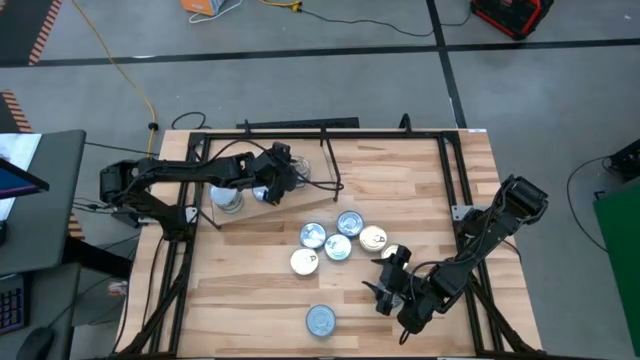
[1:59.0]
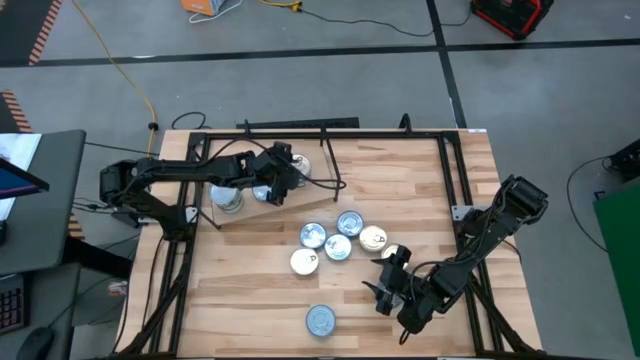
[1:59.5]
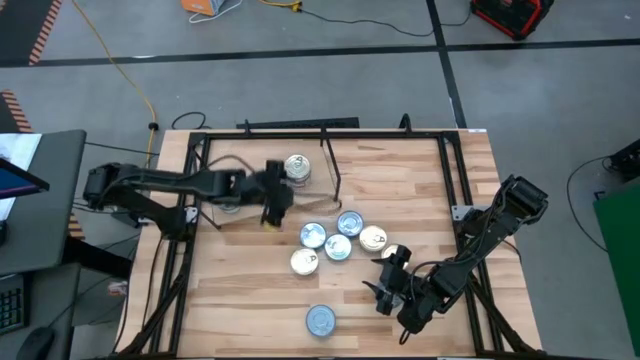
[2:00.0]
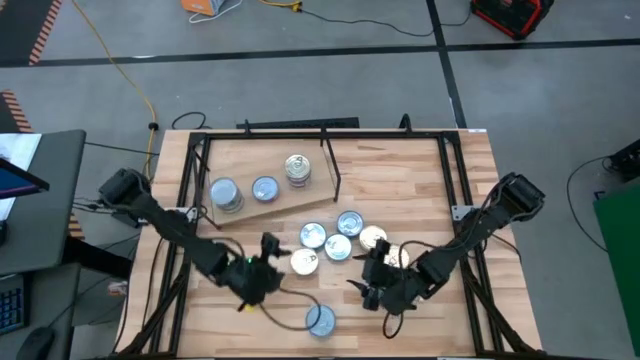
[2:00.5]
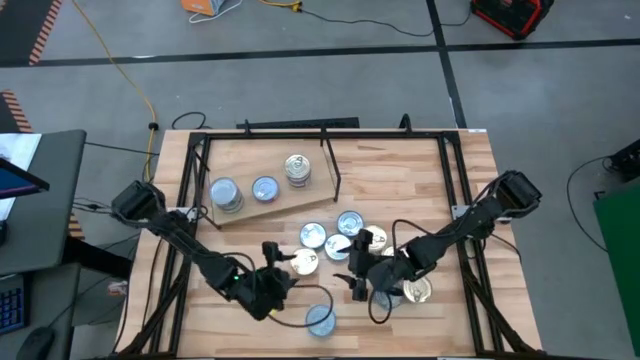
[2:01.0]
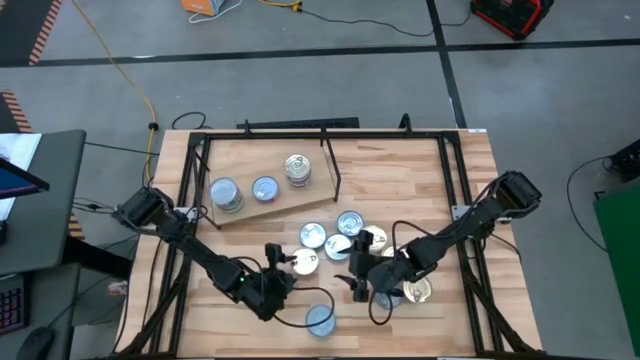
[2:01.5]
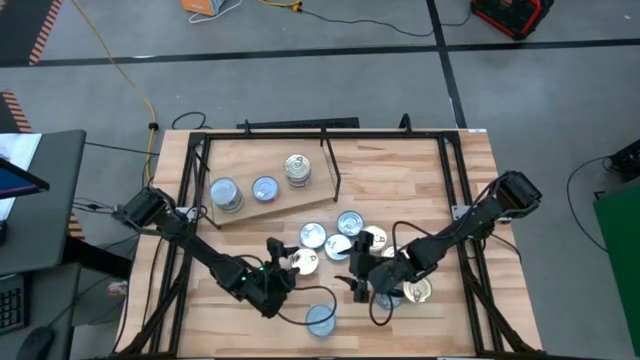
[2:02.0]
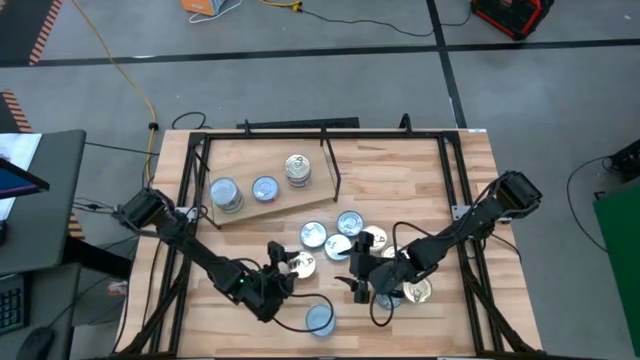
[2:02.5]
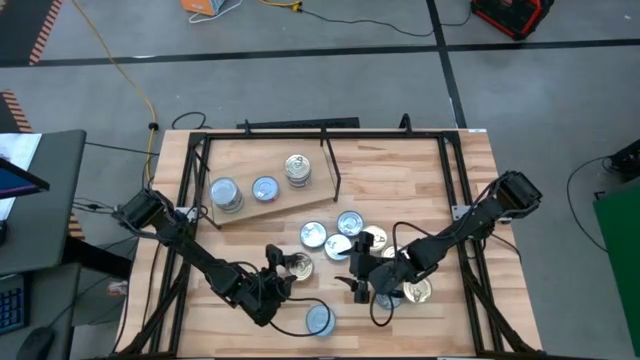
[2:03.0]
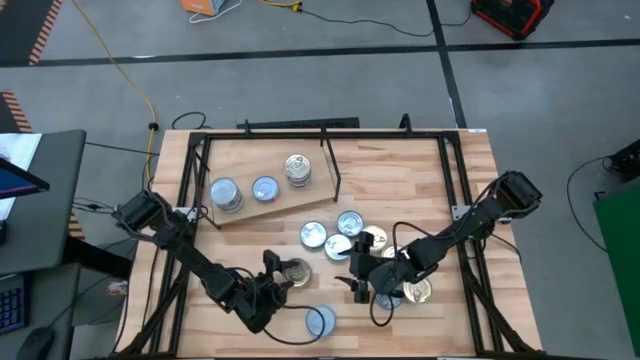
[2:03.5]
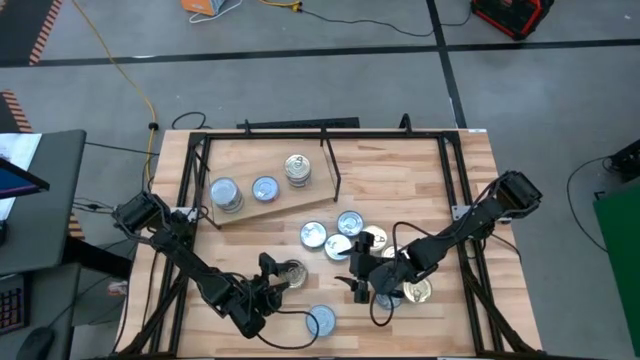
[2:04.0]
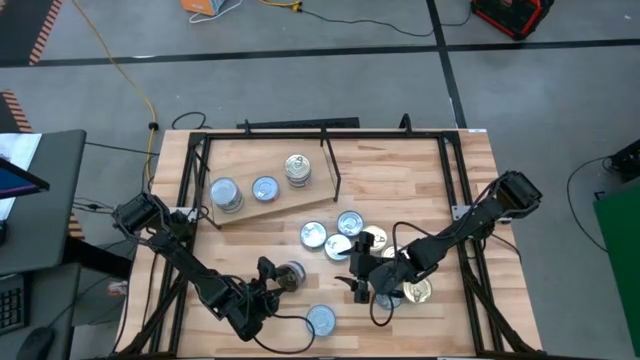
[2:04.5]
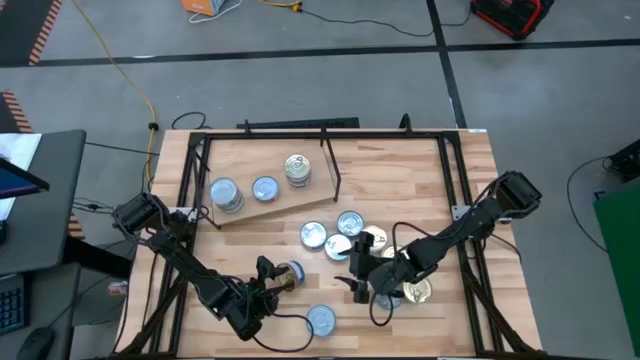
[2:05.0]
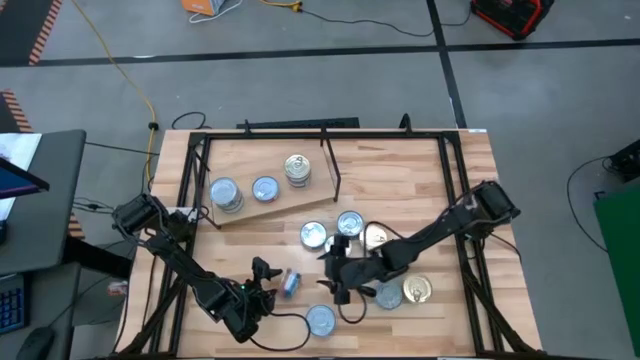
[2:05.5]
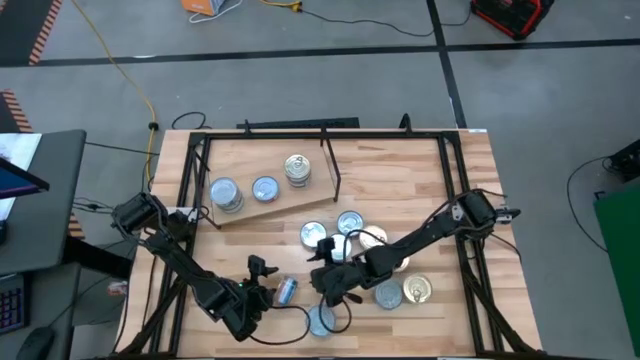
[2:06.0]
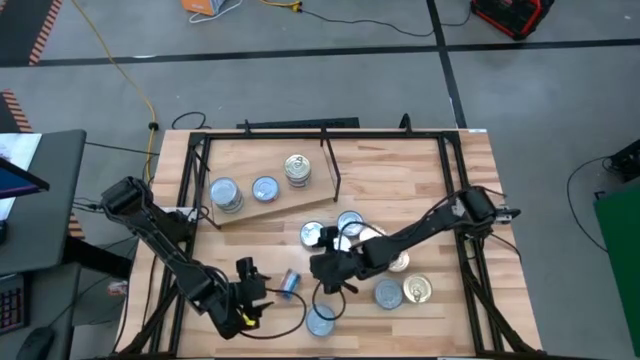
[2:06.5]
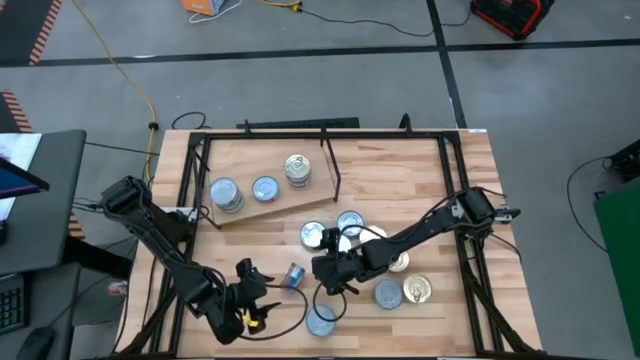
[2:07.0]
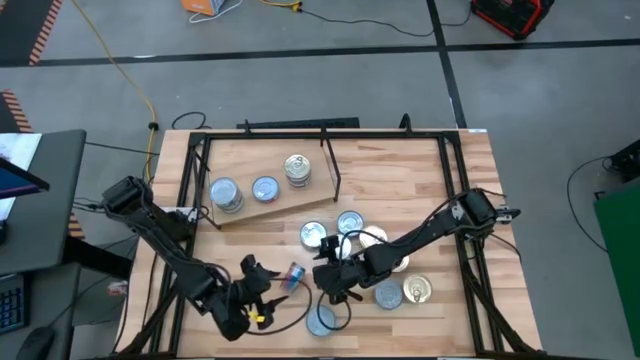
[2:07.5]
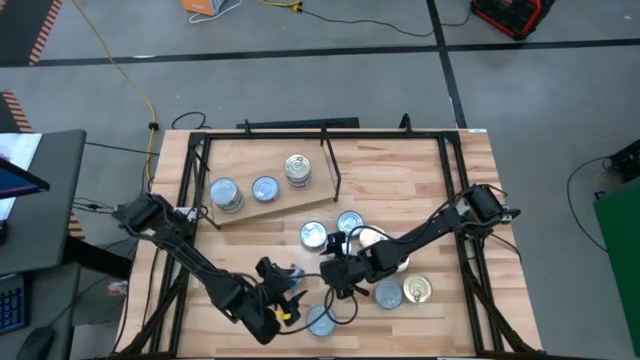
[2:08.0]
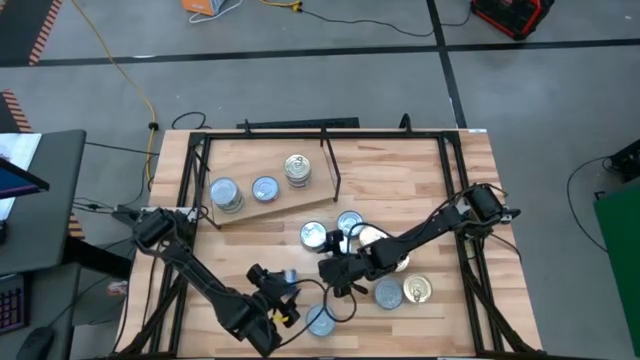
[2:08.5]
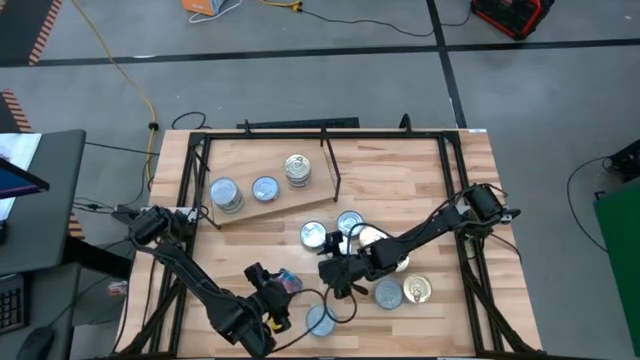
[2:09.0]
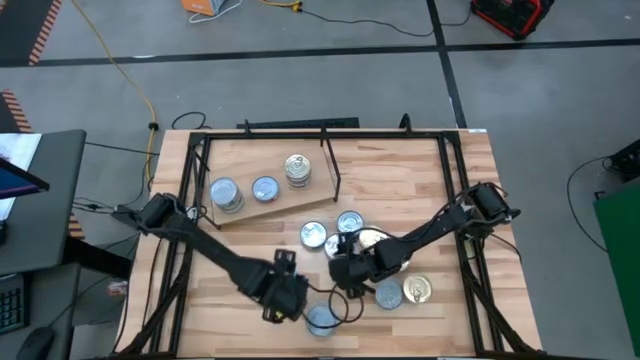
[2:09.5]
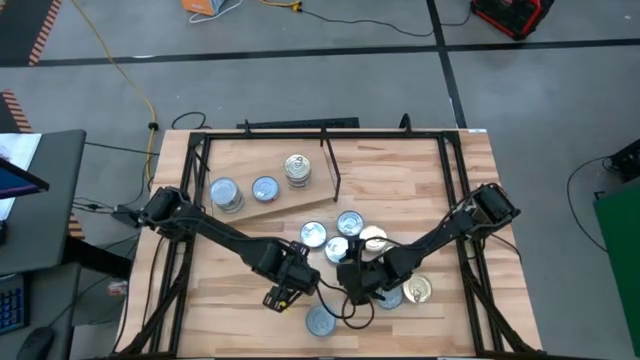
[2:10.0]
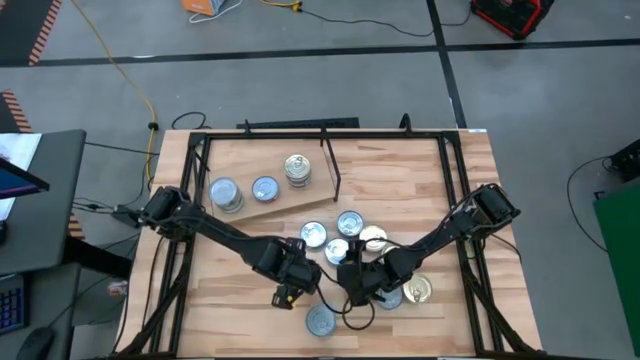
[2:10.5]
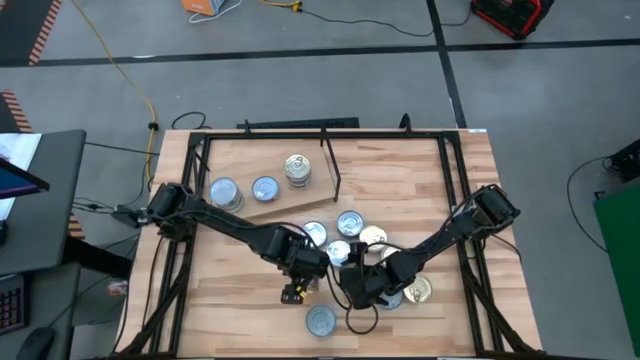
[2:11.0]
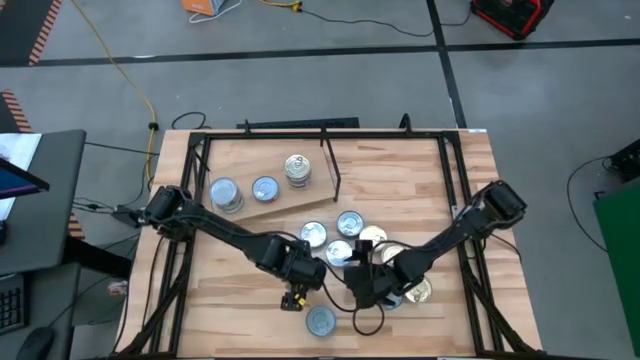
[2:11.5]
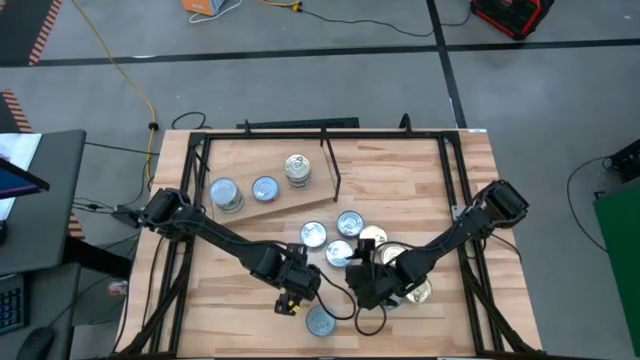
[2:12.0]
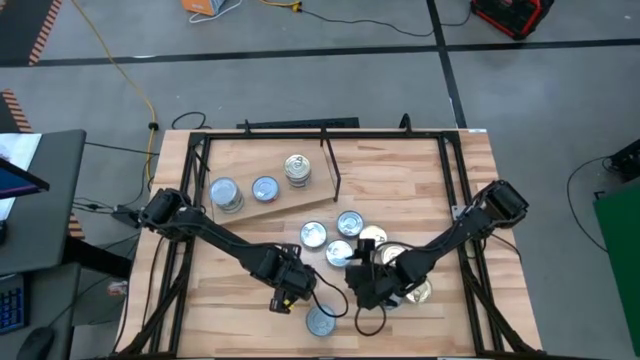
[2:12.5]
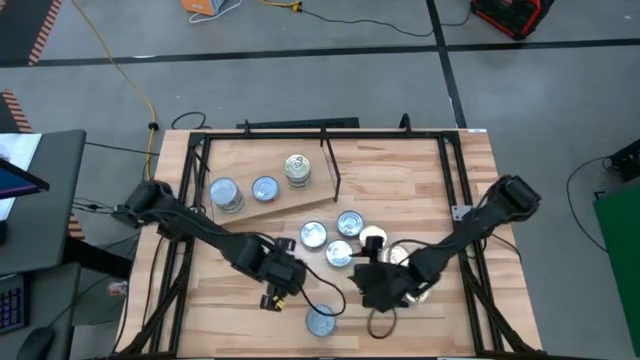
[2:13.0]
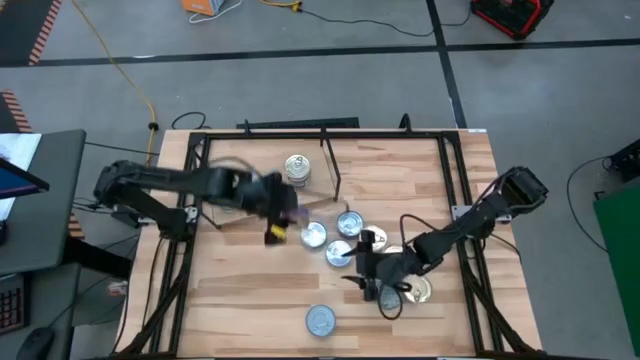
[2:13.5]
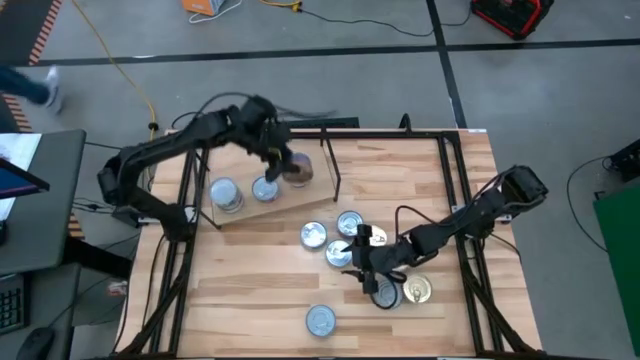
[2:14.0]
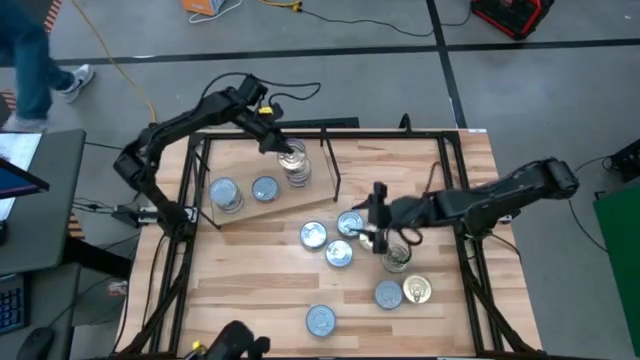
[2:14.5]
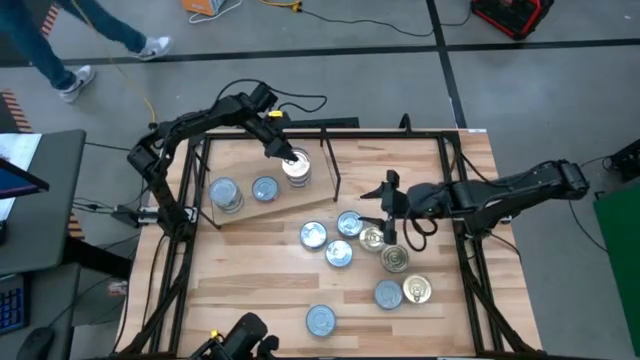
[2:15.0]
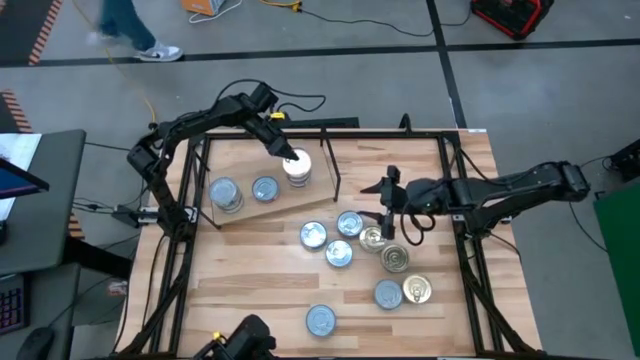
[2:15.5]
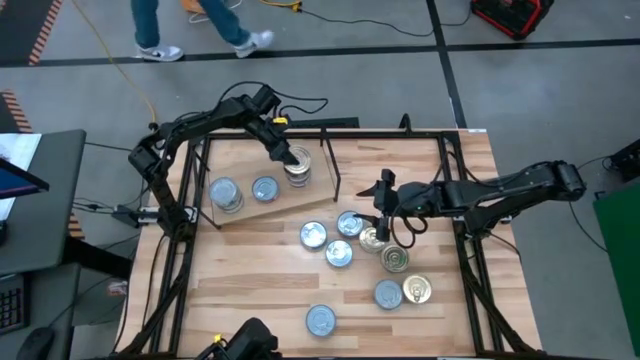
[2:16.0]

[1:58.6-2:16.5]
Task: Stack canned seafood by type on shelf
Stack the blue pink tuna can on top of the blue pink tuna can on the shelf

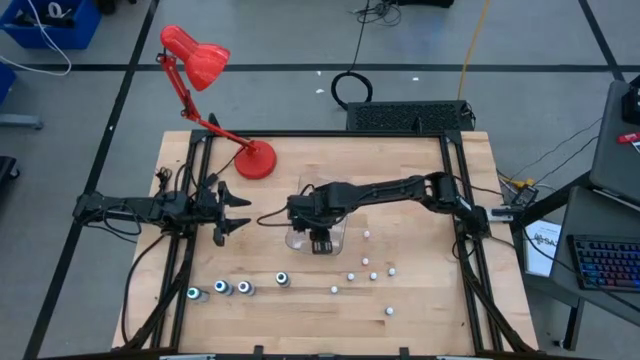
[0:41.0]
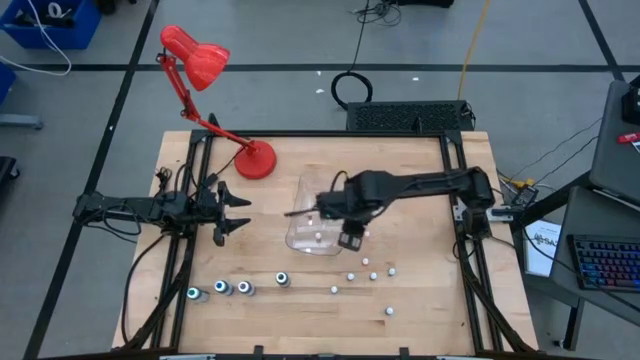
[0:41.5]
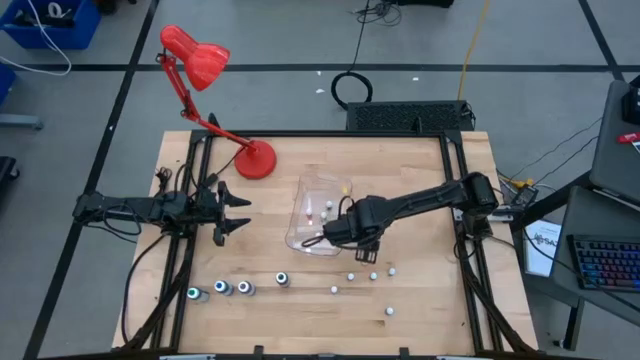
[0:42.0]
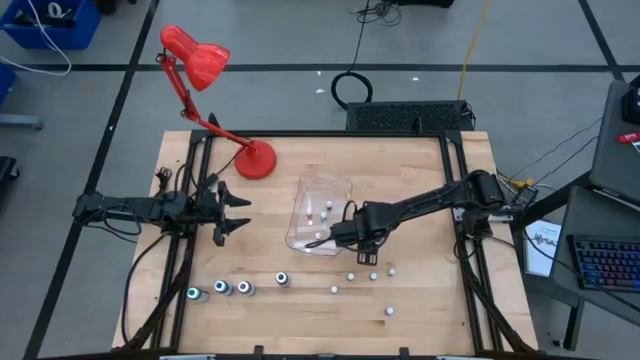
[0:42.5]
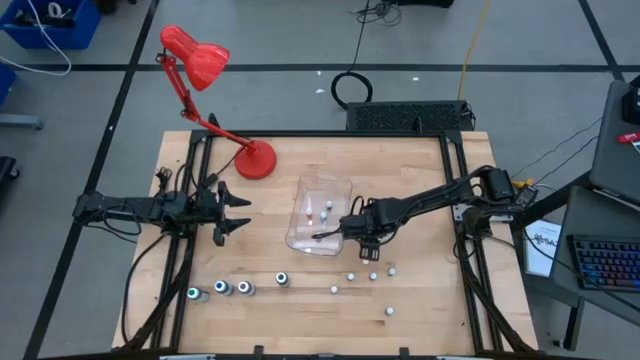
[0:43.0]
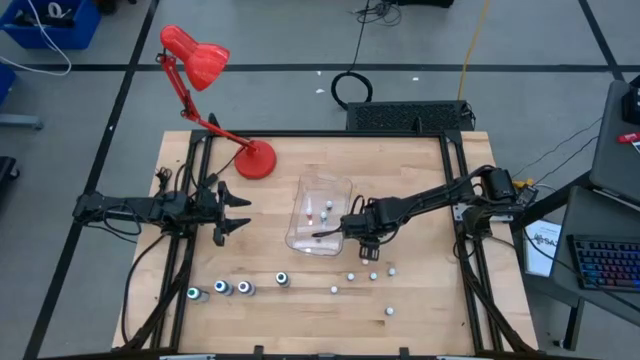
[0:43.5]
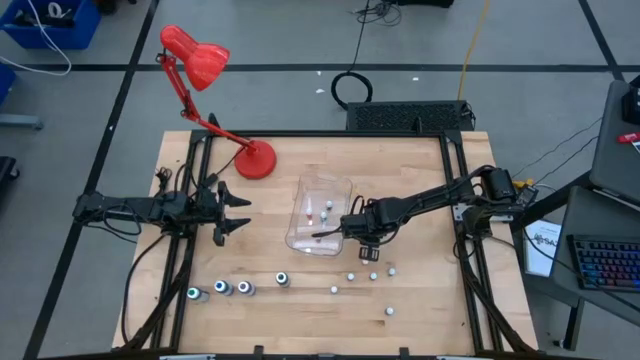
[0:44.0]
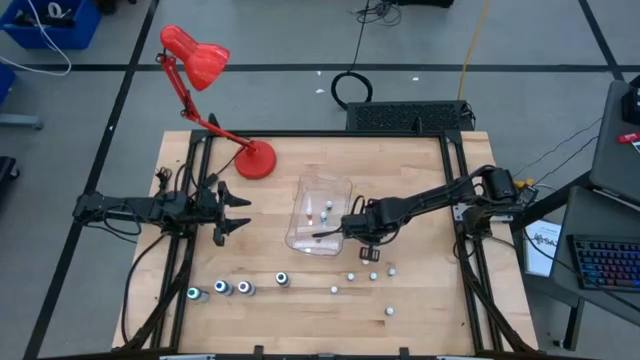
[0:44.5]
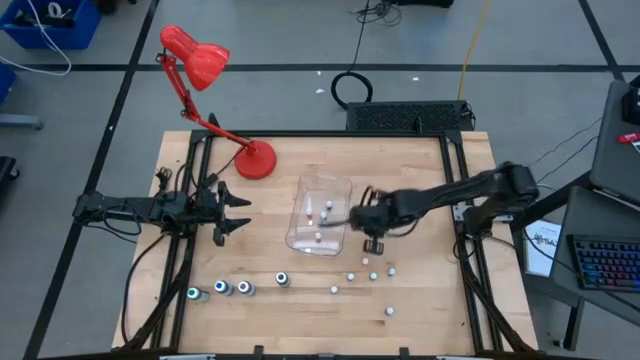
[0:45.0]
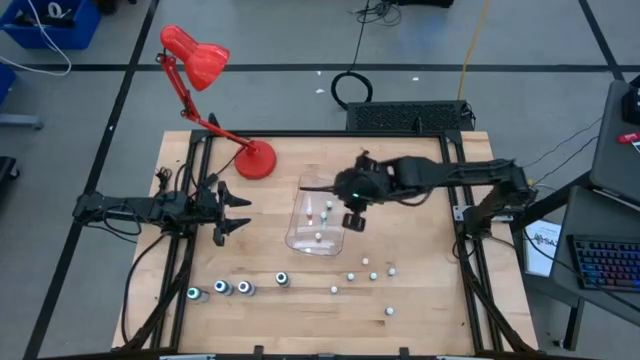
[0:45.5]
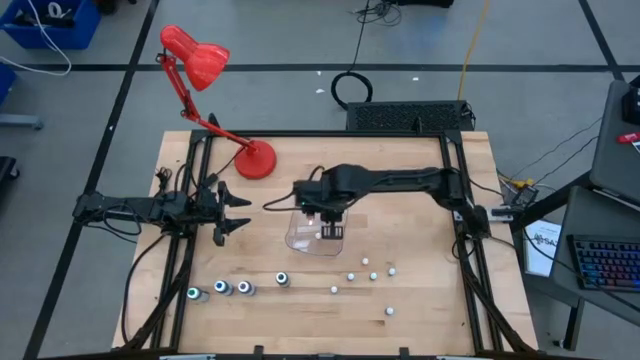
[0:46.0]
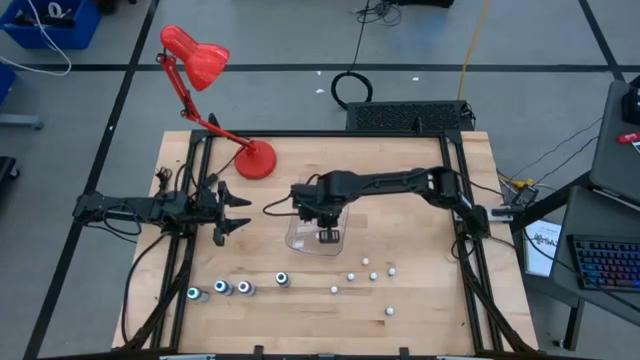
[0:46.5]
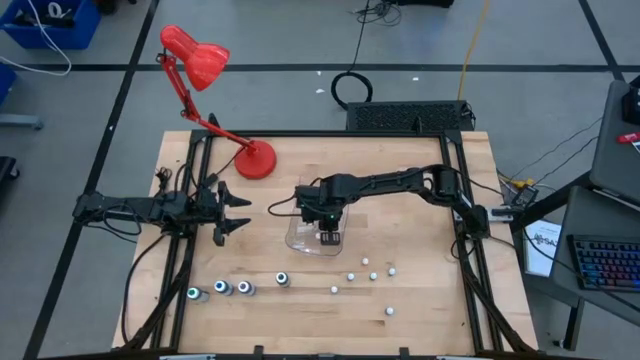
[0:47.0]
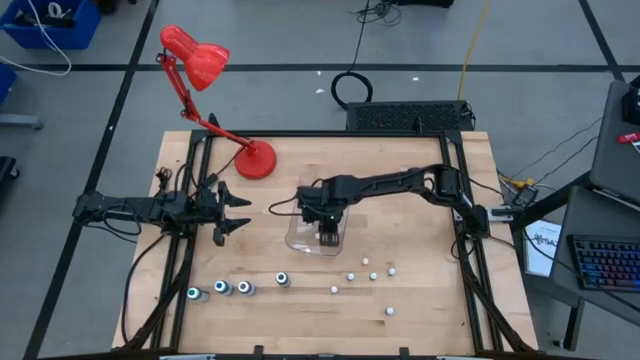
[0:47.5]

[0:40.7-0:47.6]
Task: Pick & Place food coloring
Put the small orange food coloring bottle into the transparent bin
